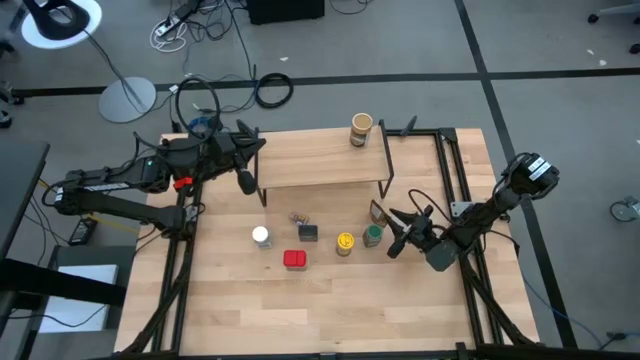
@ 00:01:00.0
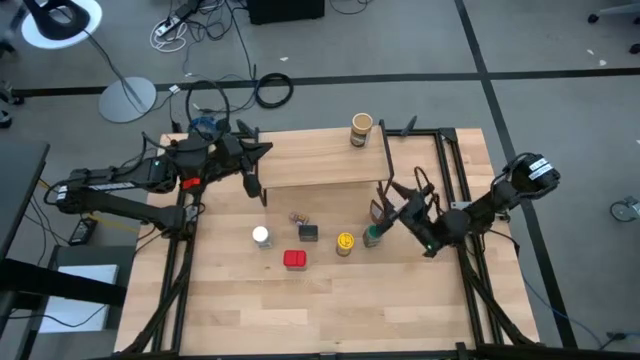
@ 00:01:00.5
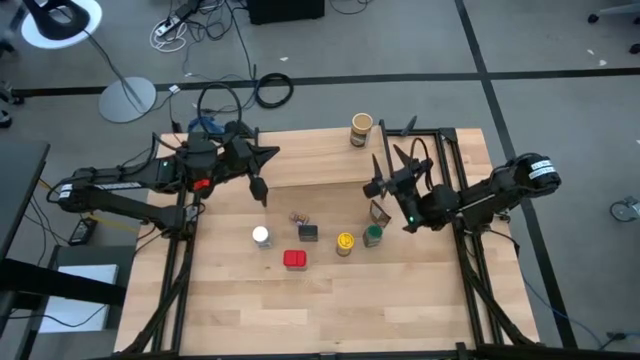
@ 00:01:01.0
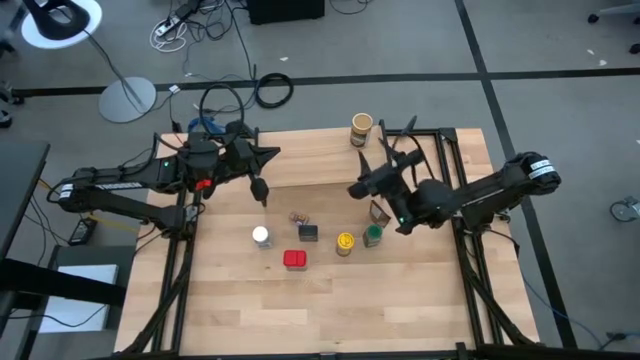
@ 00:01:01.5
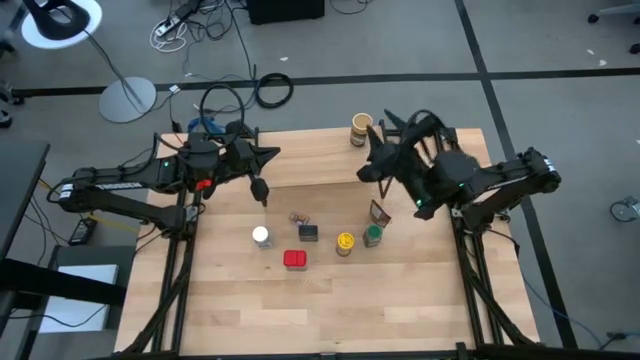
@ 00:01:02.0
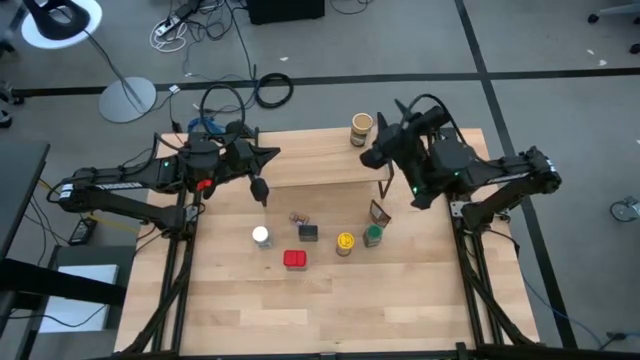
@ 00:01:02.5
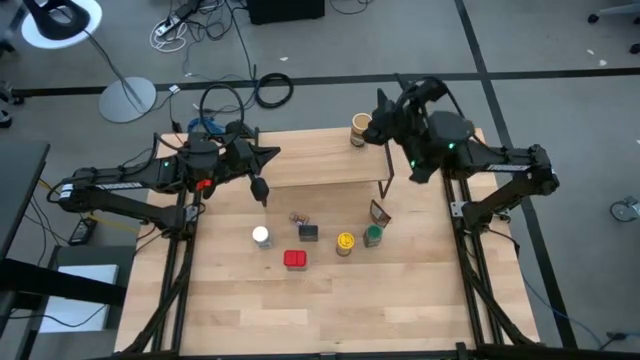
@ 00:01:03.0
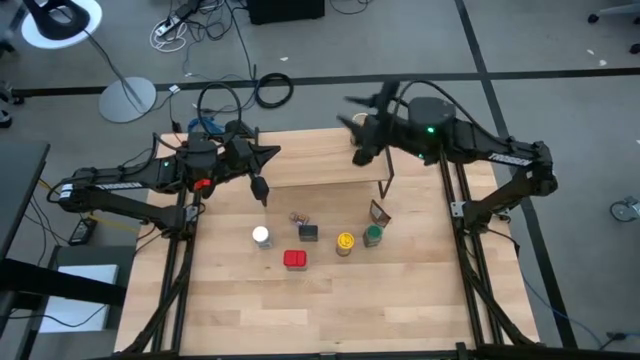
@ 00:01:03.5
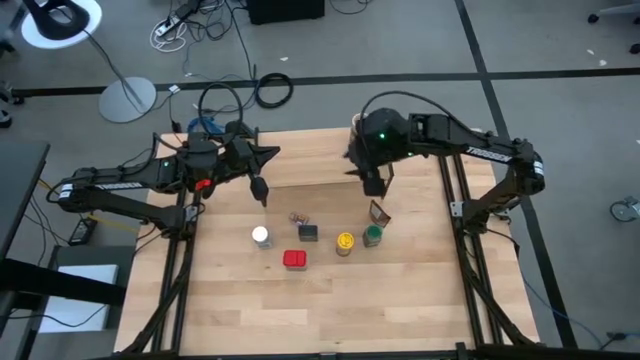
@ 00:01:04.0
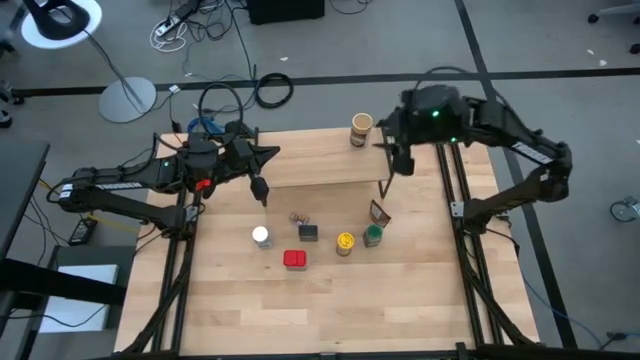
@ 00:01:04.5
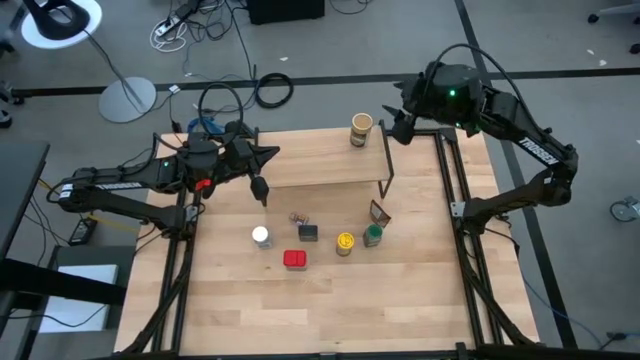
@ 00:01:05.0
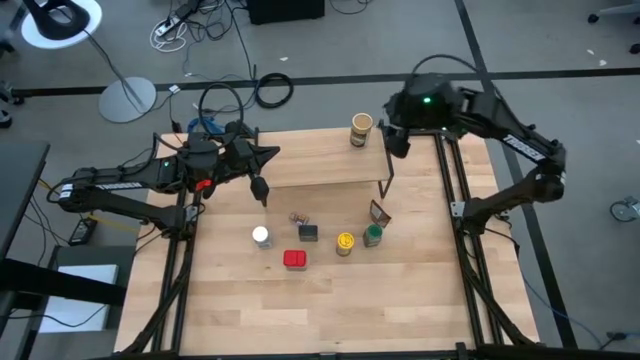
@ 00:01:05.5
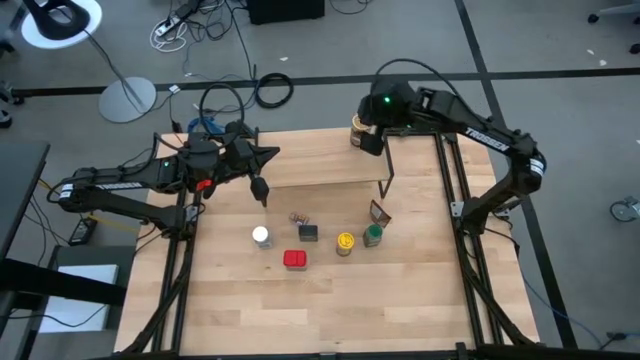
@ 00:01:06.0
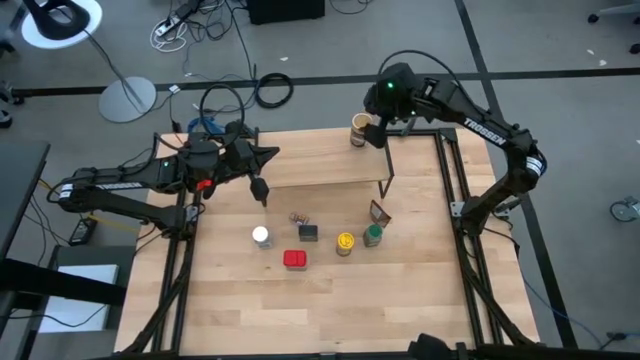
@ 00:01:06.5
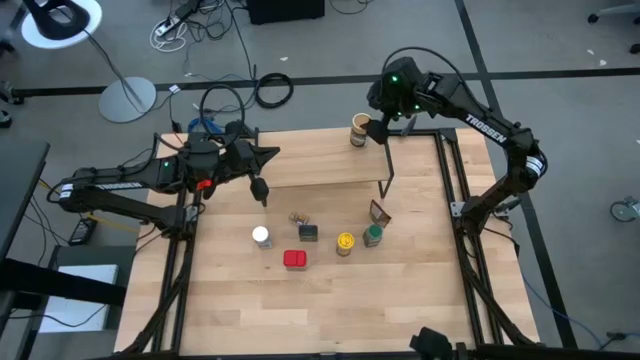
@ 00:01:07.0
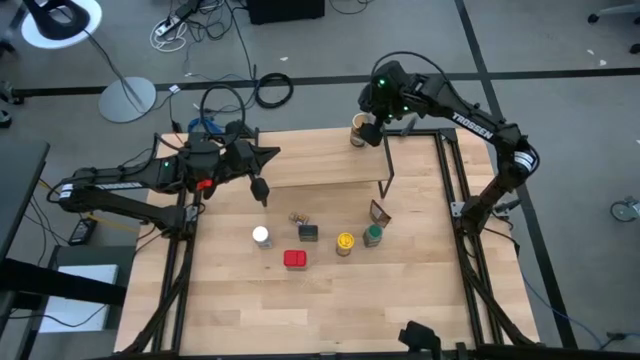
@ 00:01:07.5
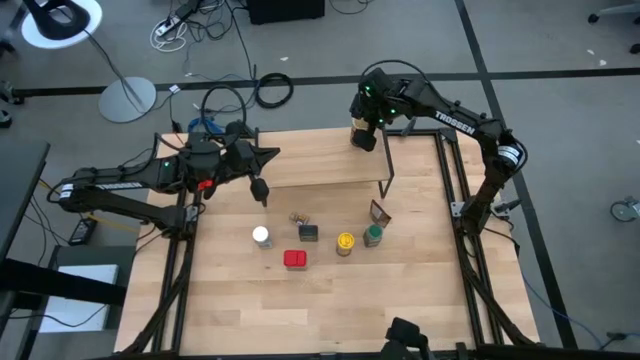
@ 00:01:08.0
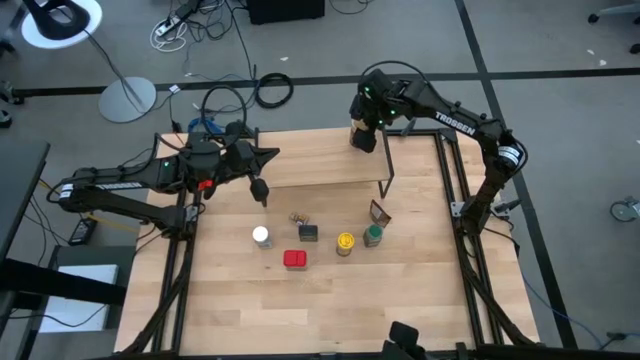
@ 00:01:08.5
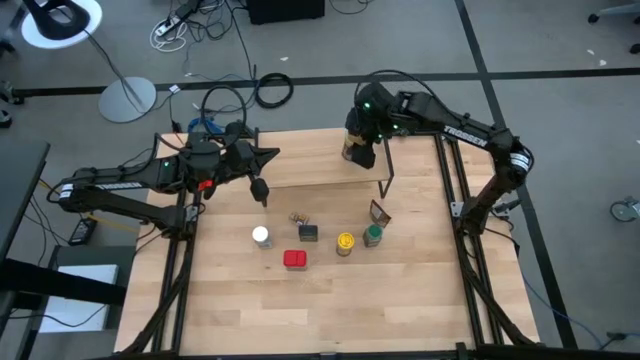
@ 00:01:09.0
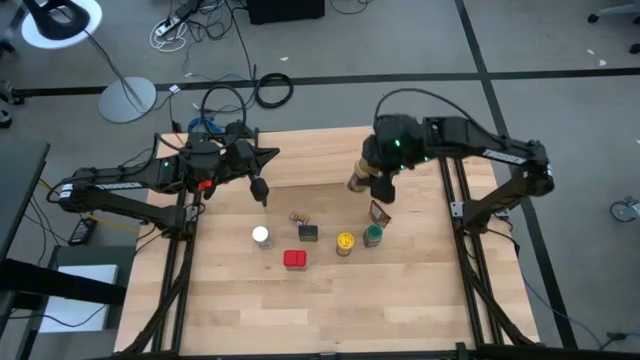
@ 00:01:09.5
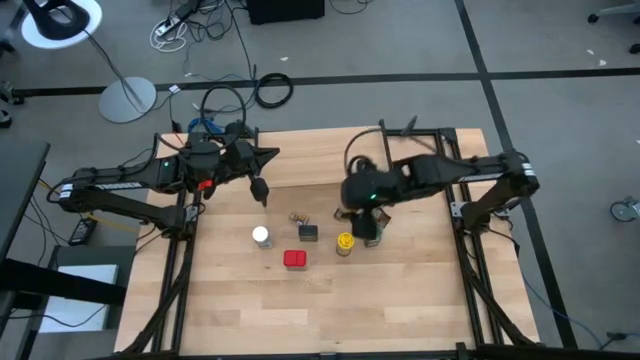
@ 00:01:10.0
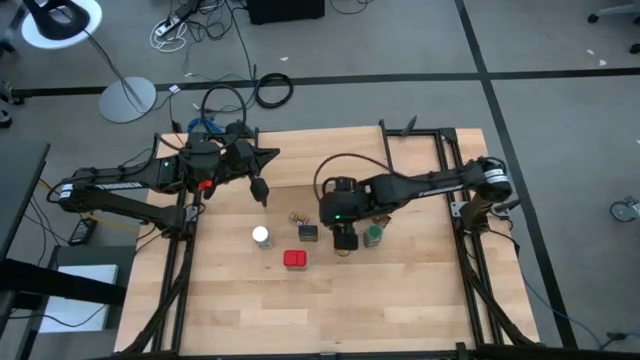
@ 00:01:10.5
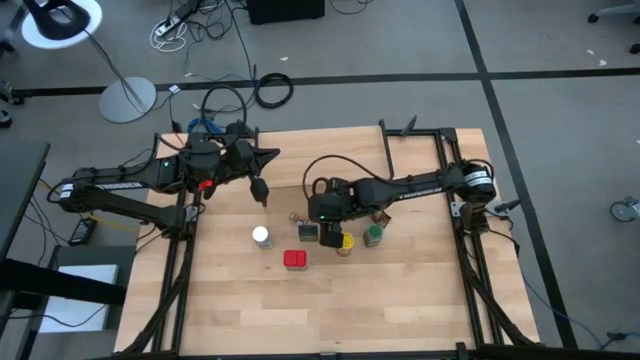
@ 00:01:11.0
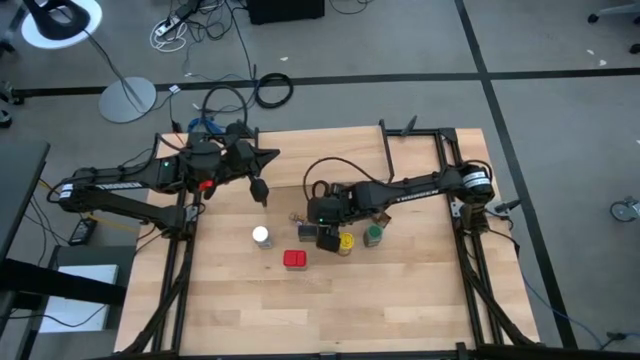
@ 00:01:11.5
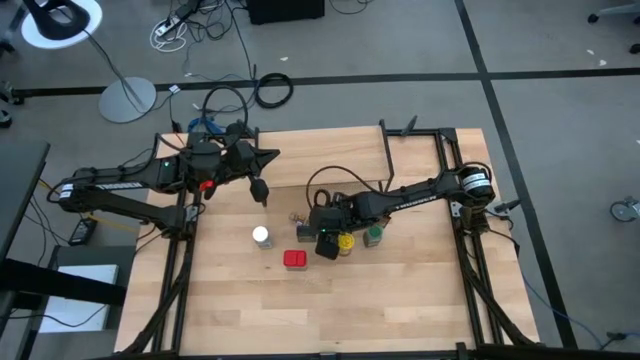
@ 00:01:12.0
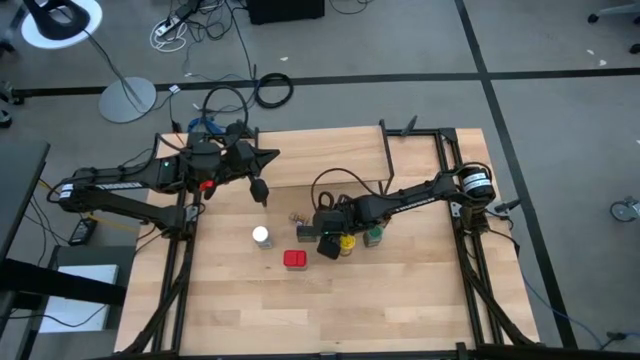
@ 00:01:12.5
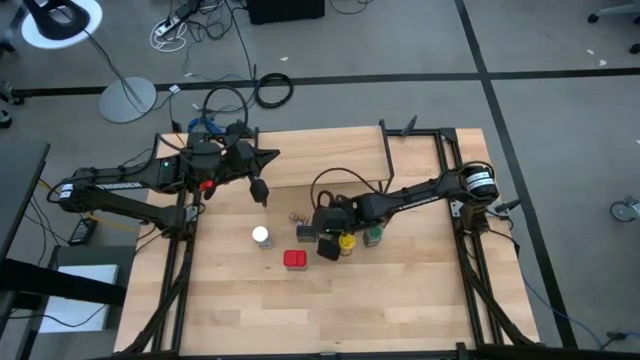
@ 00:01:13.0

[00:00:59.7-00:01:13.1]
Task: Shelf spices
Remove the brown seasoning bottle from the shelf

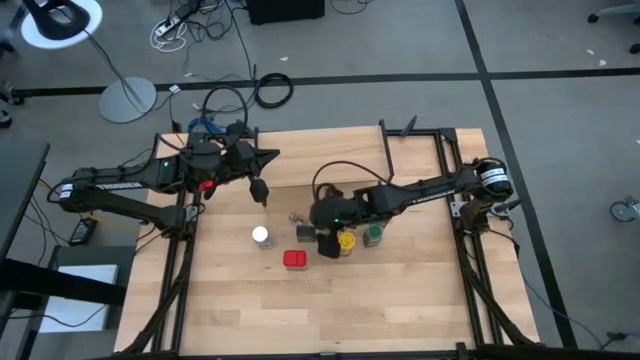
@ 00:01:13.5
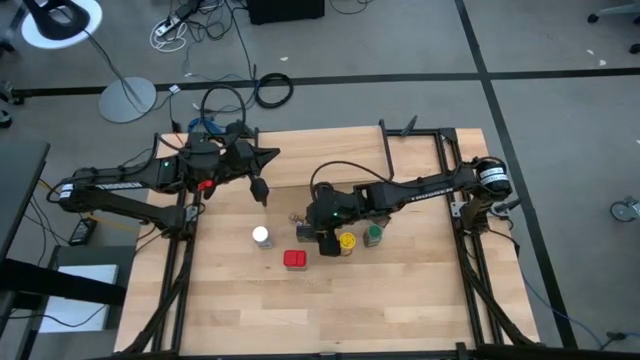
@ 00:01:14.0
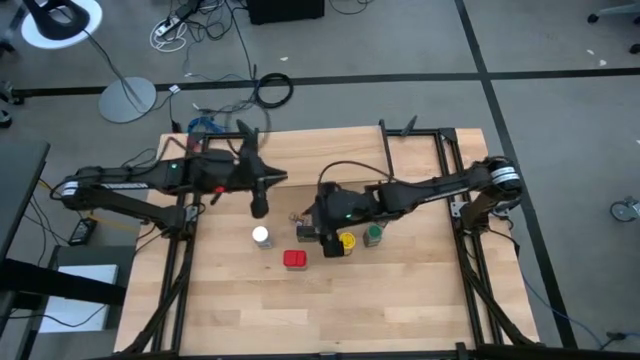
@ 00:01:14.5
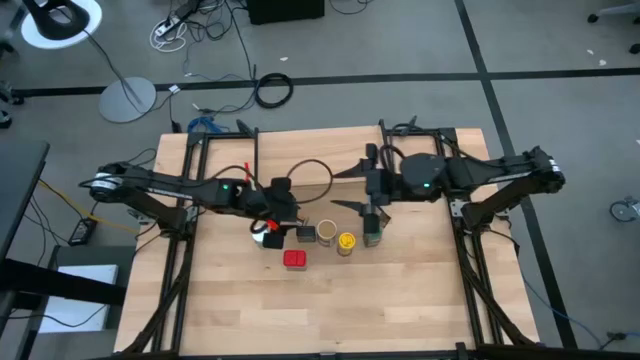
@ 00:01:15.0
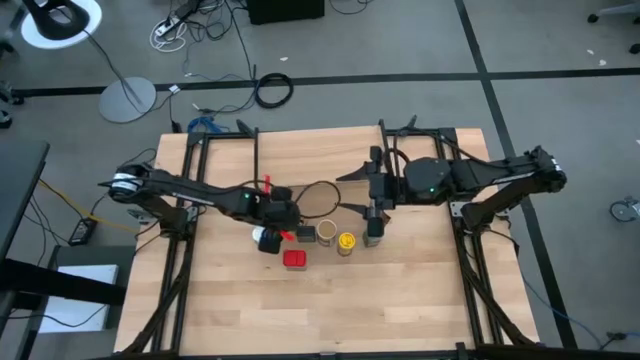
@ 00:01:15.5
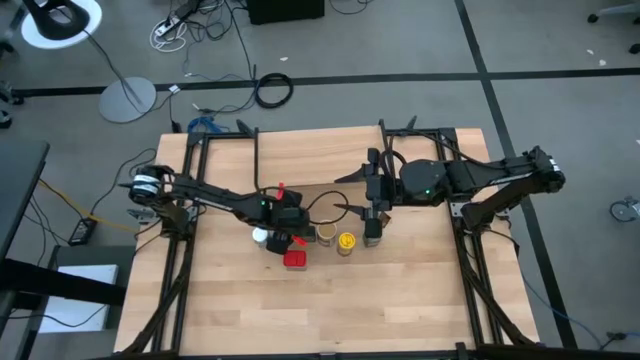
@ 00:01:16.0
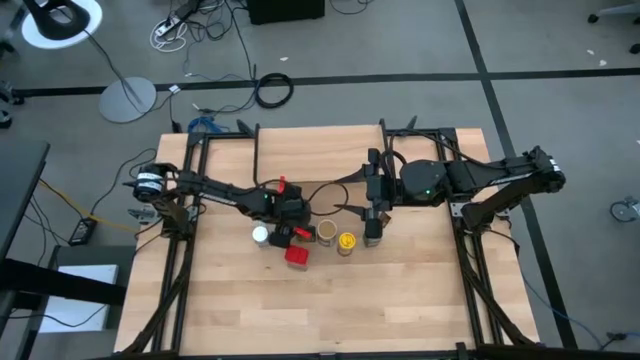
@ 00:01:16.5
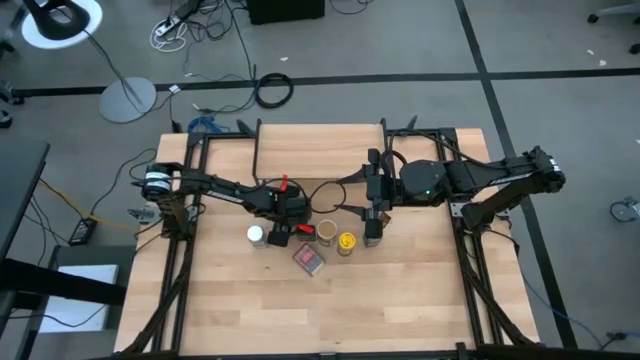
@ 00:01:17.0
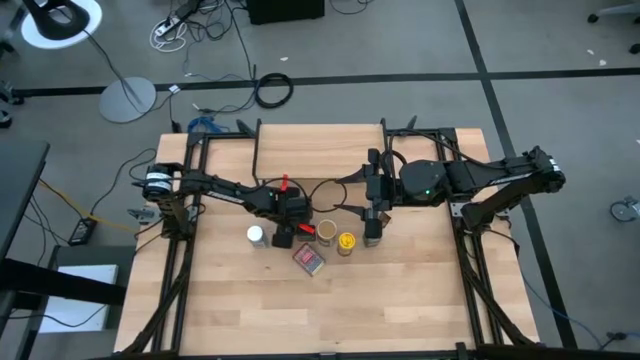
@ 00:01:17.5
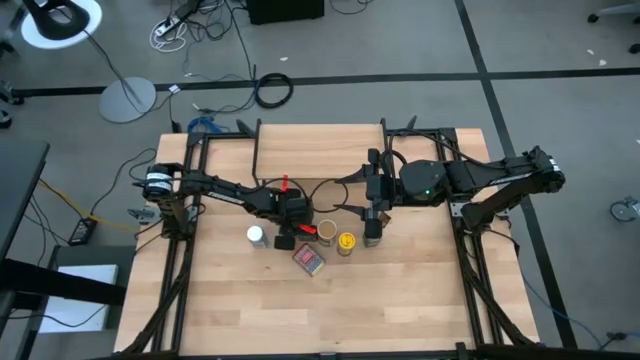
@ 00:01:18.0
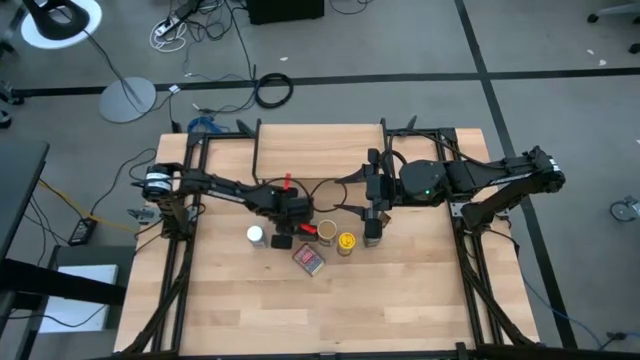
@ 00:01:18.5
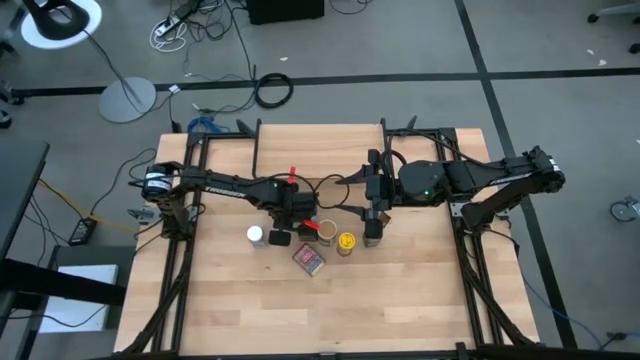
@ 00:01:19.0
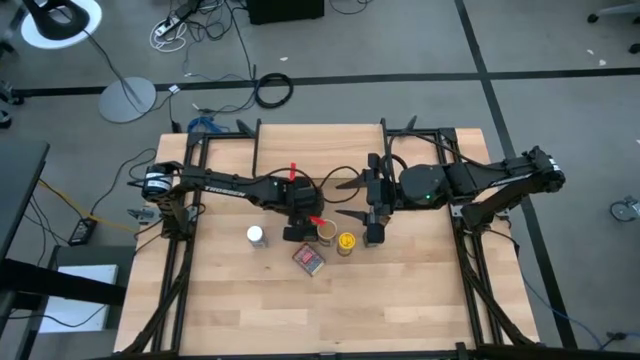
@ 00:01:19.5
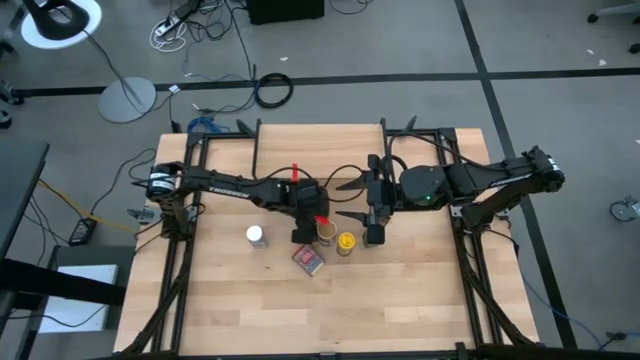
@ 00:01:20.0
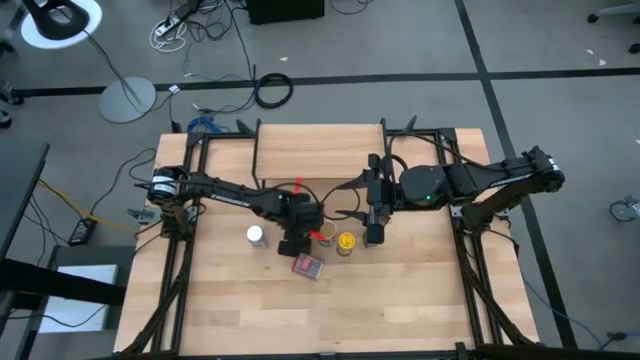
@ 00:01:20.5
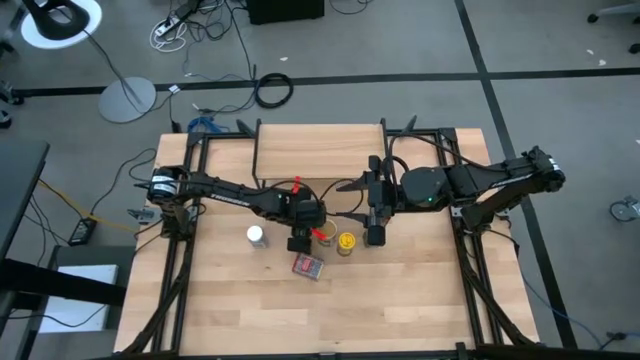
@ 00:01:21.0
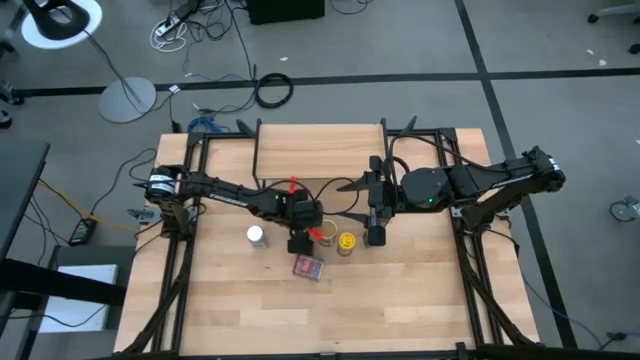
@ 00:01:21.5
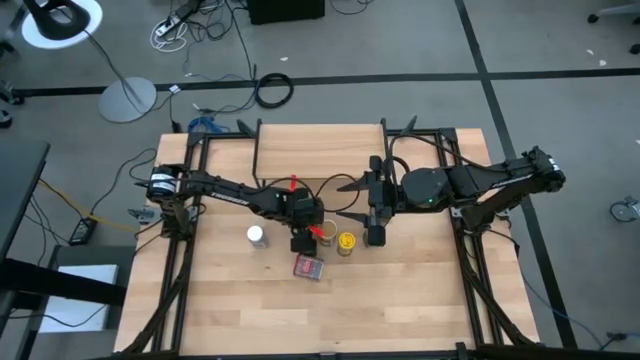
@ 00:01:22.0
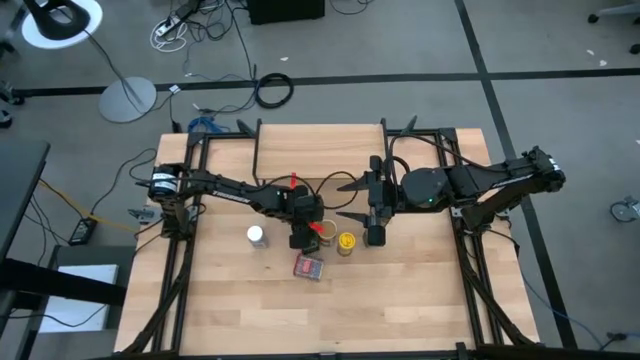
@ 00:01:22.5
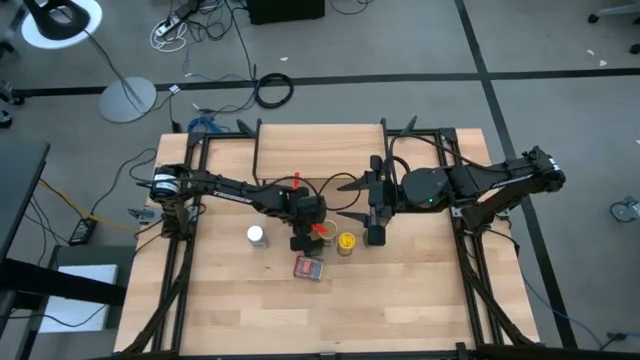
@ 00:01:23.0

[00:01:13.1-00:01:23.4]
Put the orange seasoning bottle on the shelf
